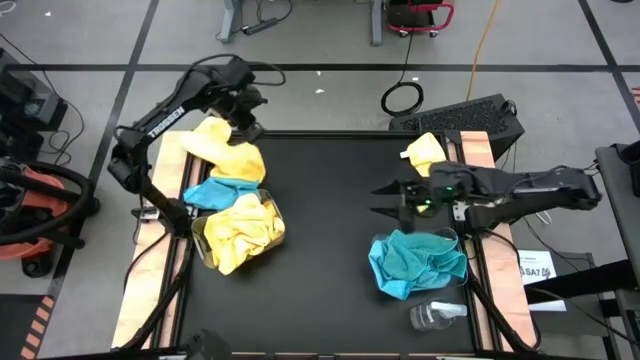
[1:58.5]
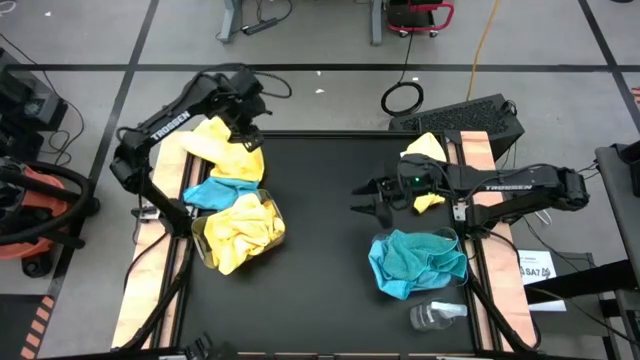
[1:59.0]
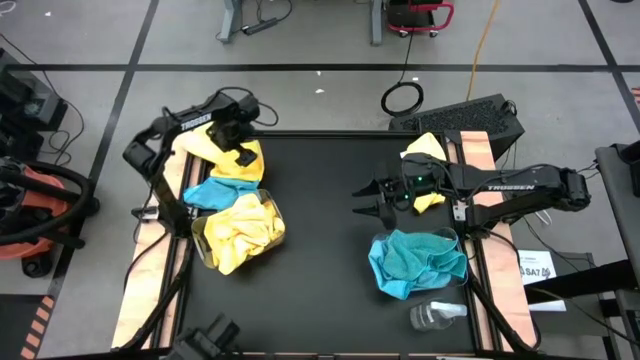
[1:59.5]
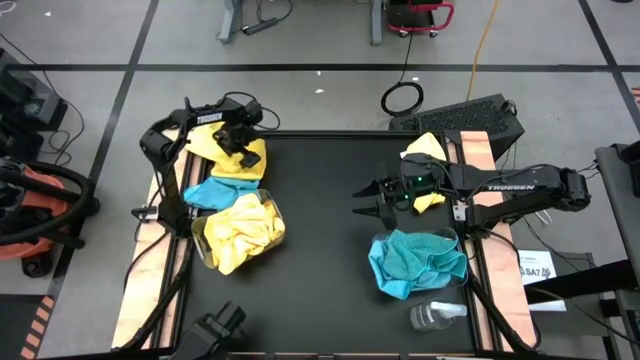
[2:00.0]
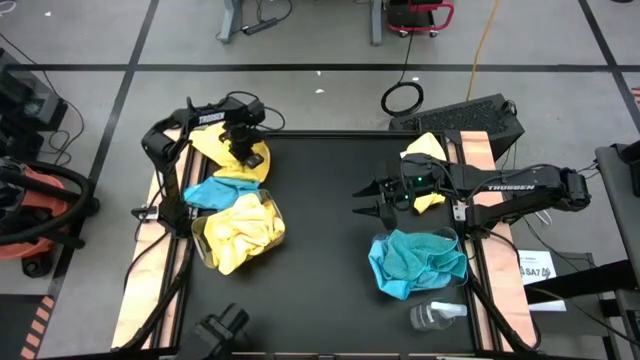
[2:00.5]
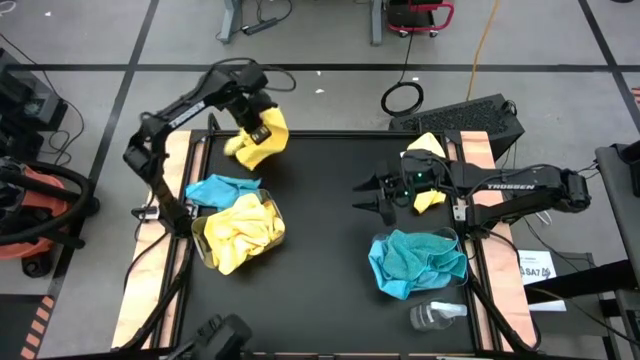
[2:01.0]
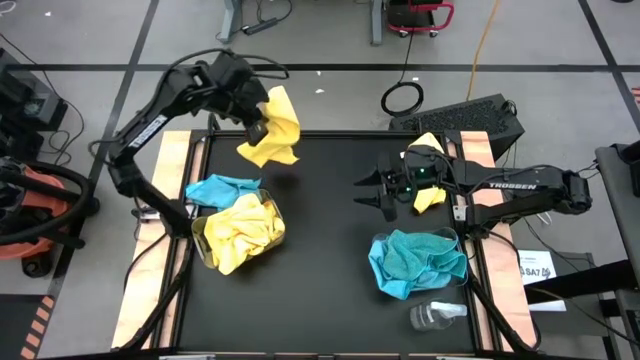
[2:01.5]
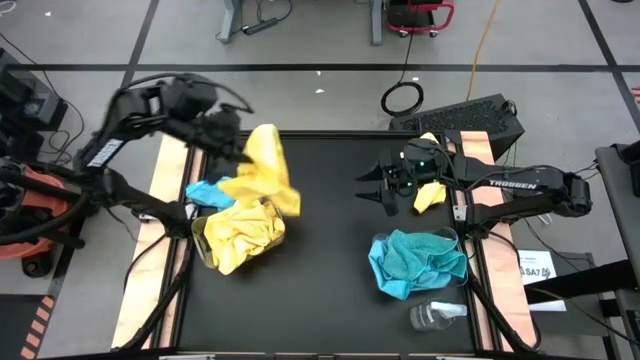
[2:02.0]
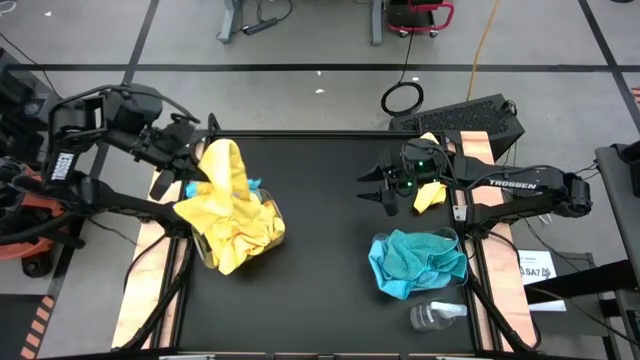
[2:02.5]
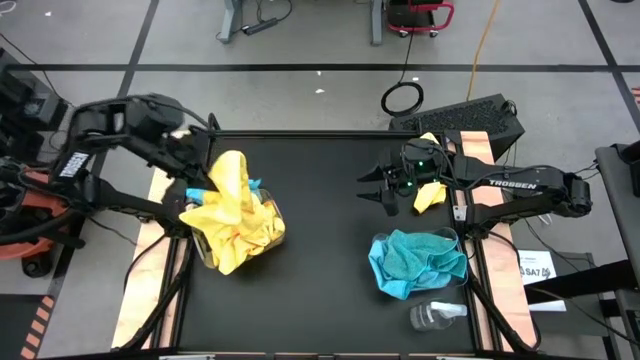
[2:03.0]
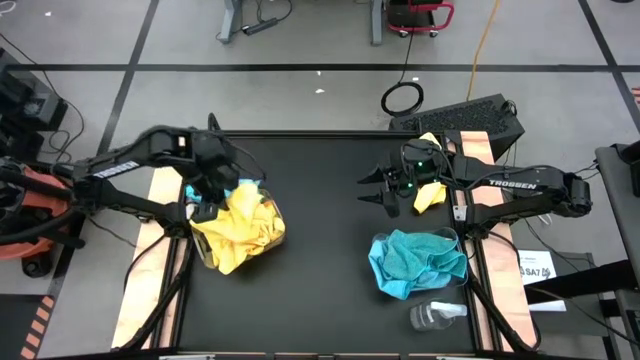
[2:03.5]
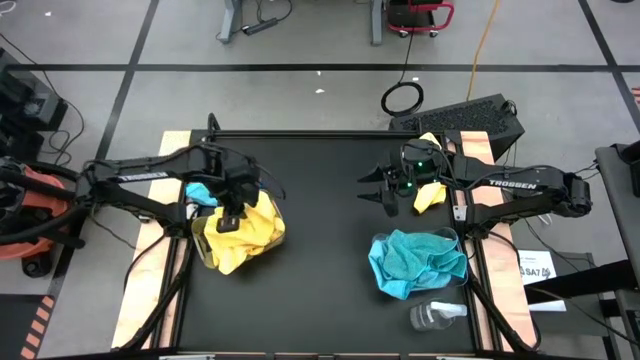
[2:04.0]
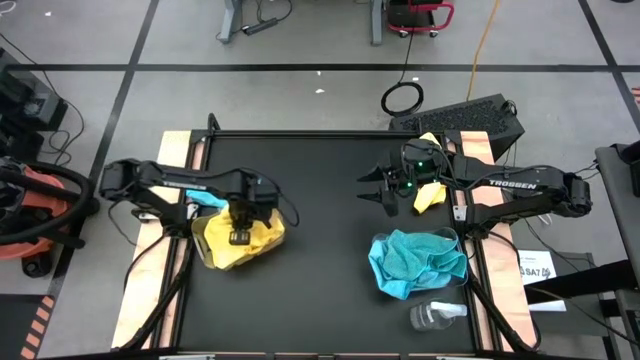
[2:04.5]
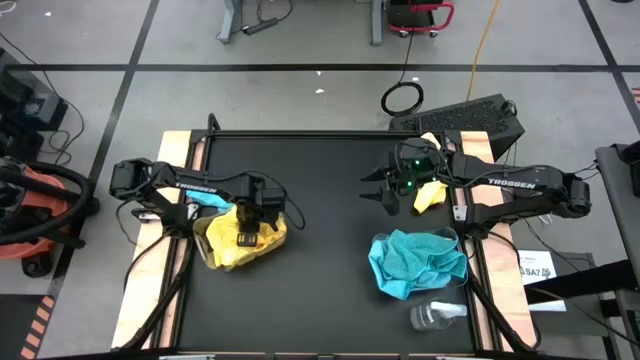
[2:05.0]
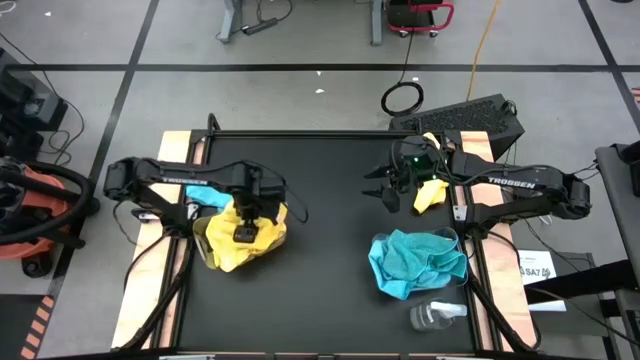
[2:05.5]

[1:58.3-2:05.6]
Task: Sort microfiber towel by color & place in baskets
Put the yellow microfiber towel into the left transparent bin

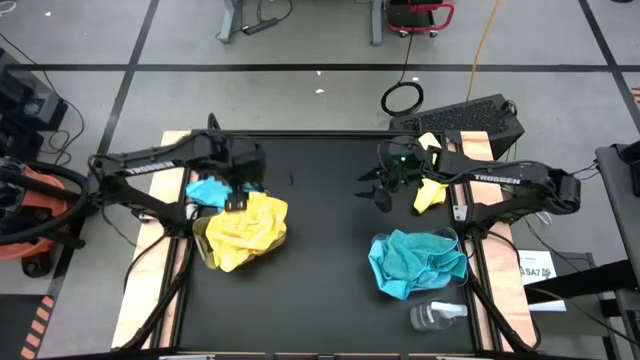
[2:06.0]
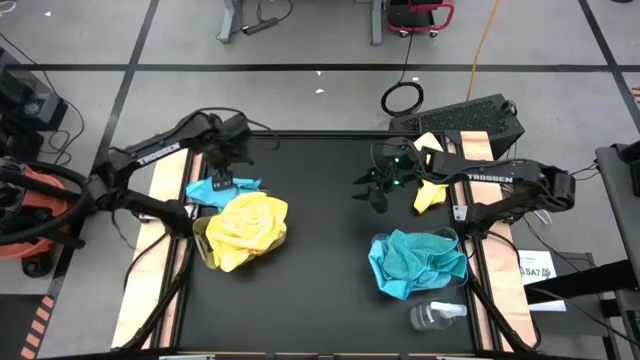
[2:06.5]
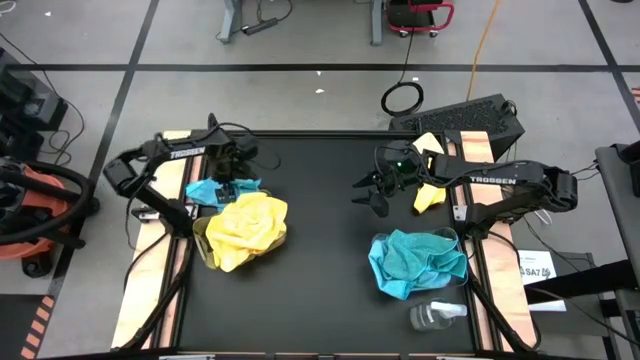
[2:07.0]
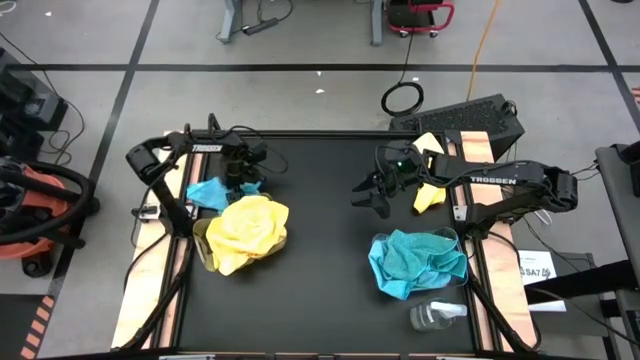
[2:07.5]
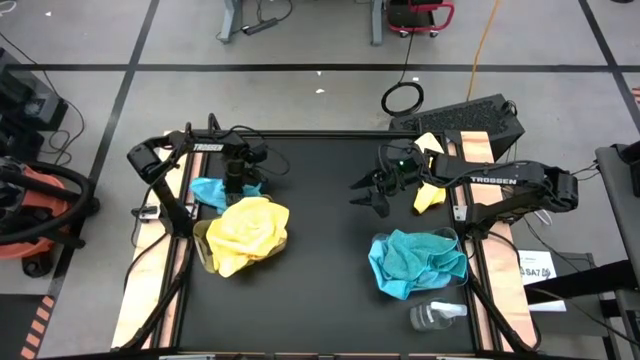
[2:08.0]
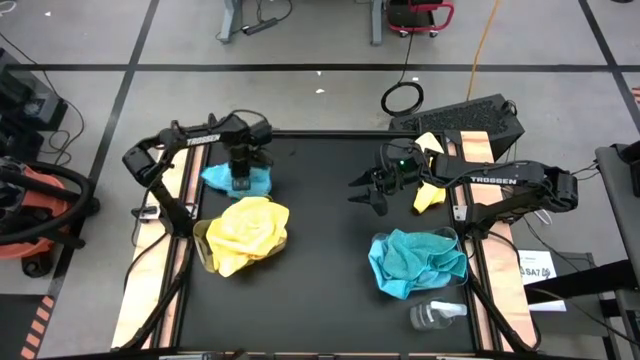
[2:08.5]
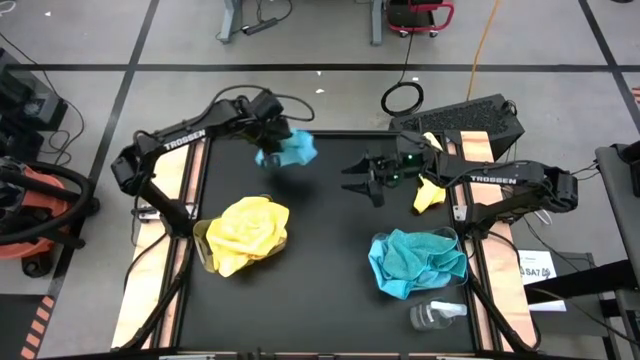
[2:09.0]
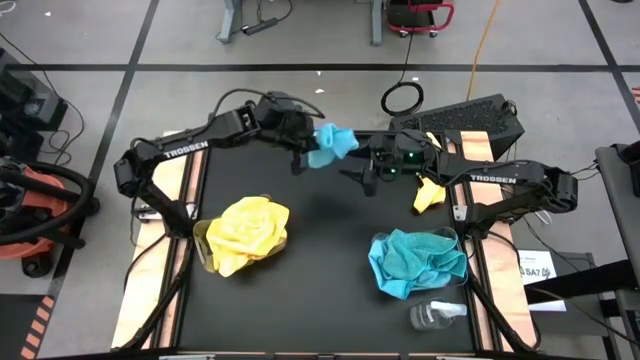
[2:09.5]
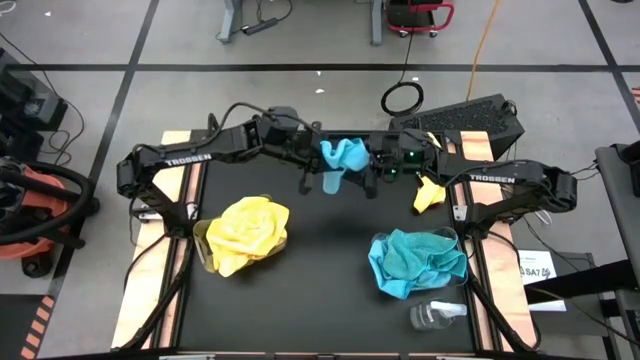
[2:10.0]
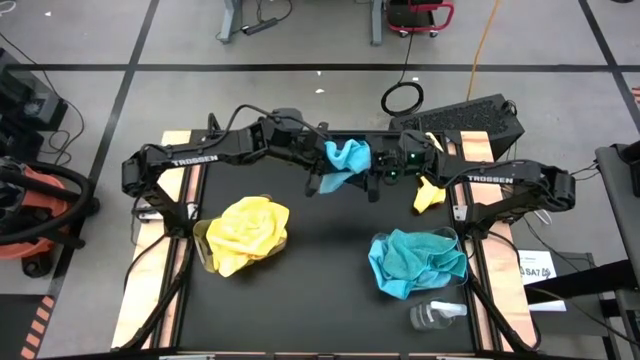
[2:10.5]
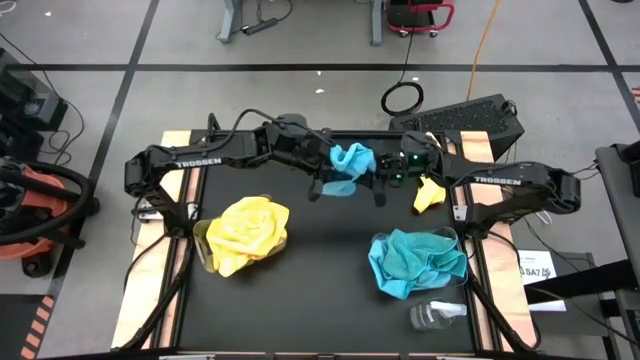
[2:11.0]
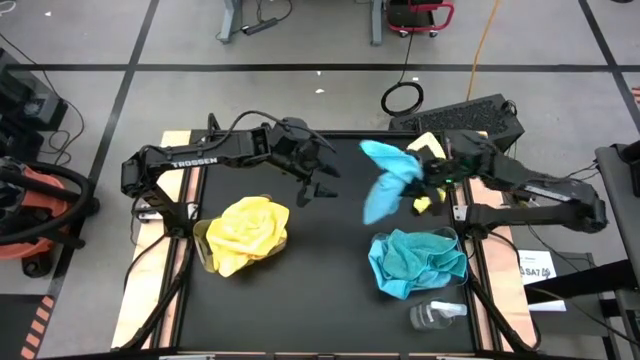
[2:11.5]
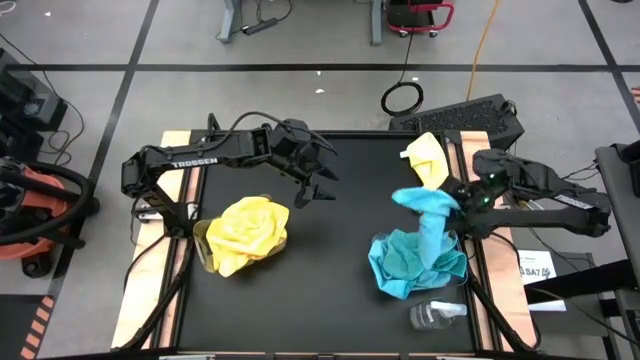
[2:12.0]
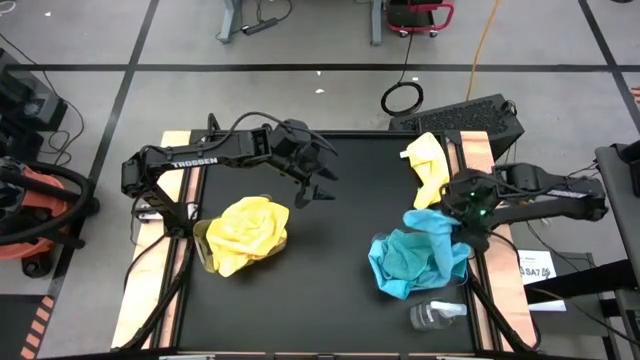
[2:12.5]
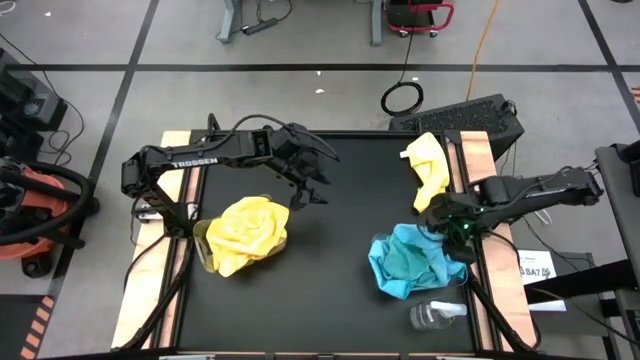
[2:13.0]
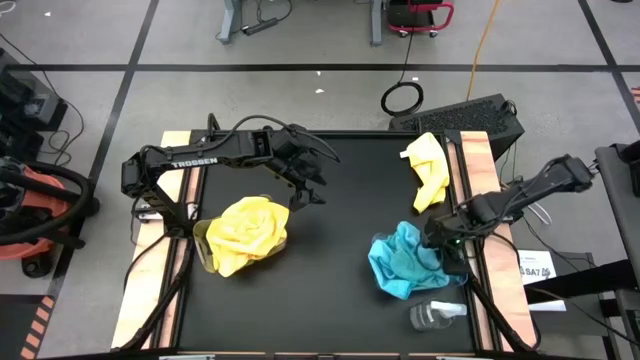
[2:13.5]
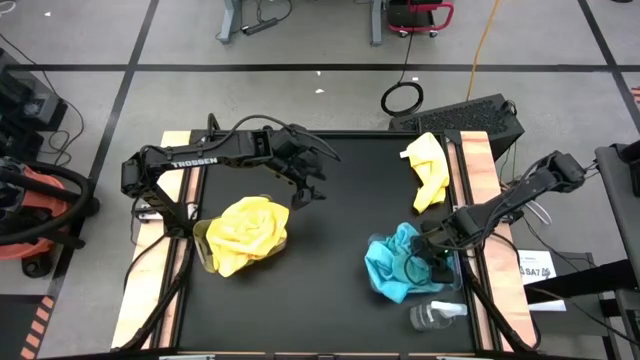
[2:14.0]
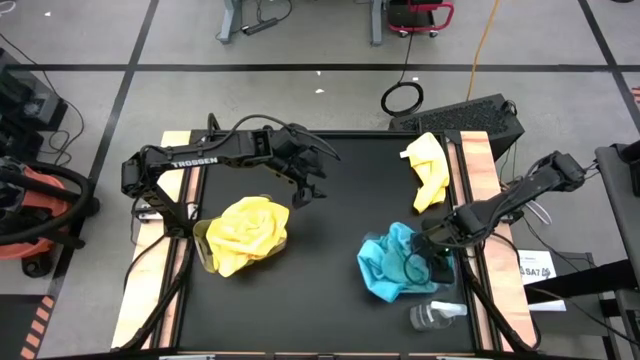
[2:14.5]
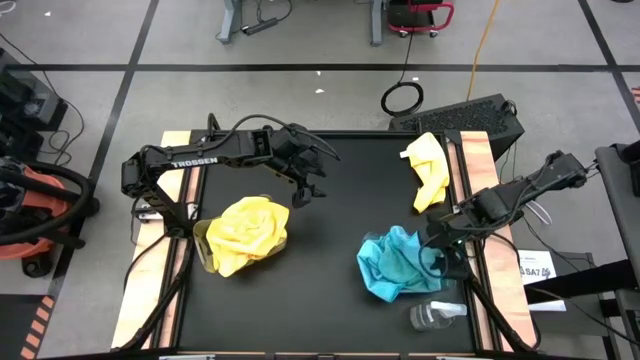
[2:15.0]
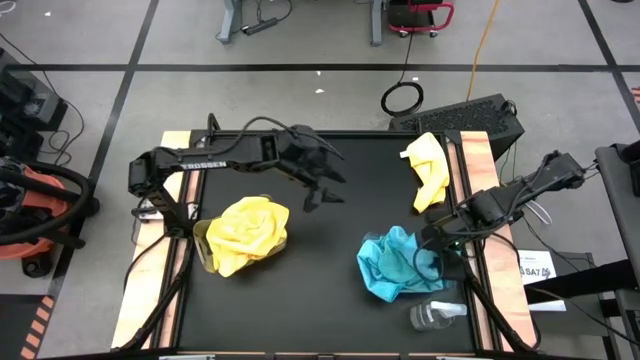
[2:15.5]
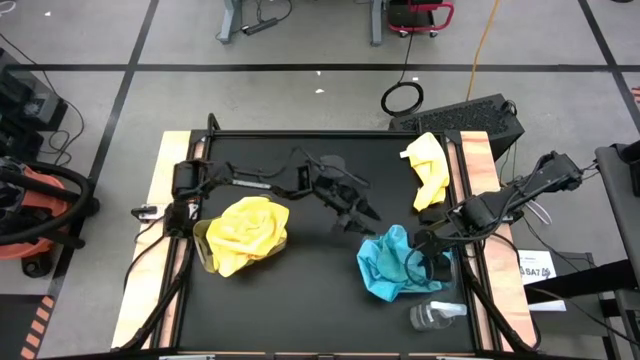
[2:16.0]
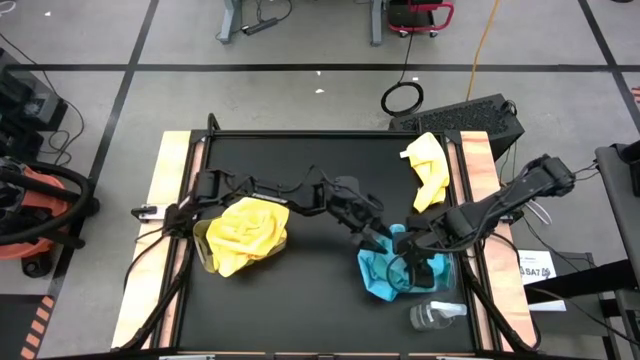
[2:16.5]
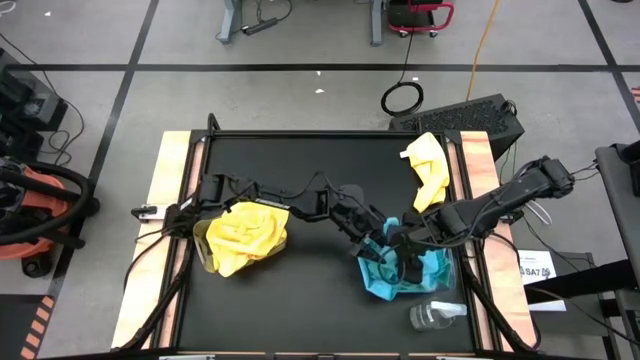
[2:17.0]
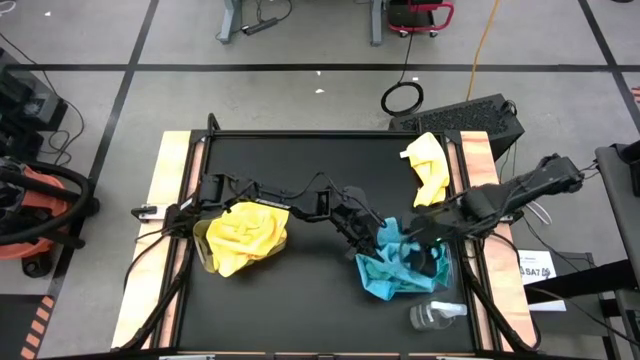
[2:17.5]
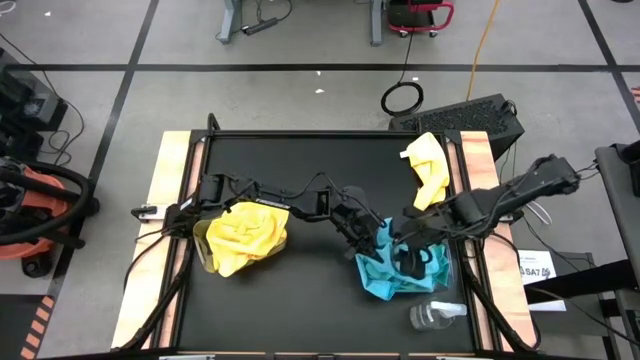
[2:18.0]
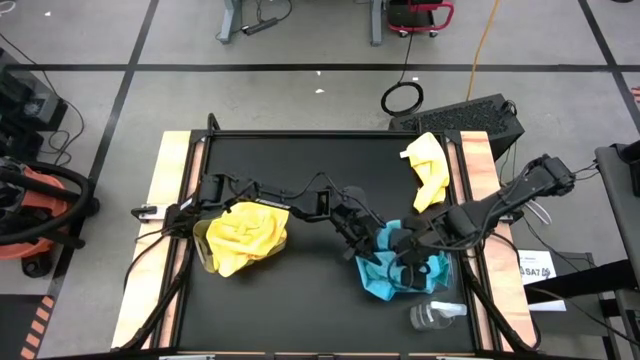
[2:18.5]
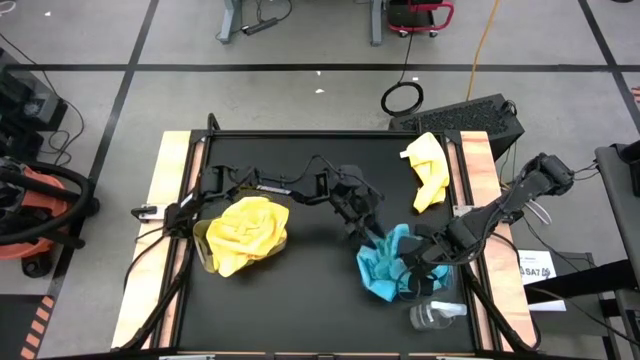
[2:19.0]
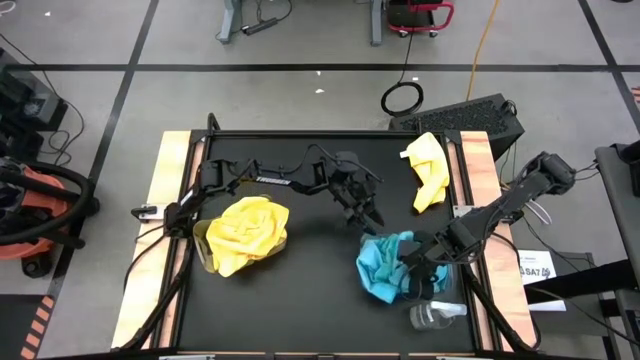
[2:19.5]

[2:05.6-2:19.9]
Put the blue microfiber towel into the right transparent bin

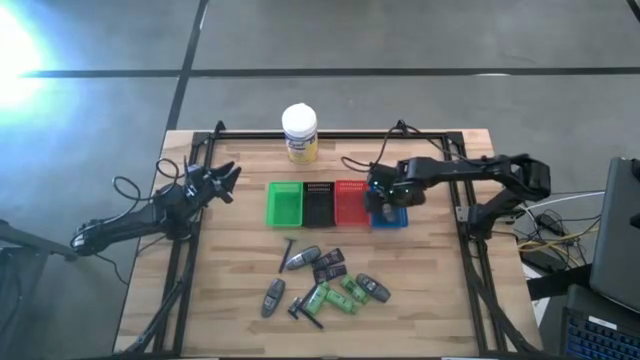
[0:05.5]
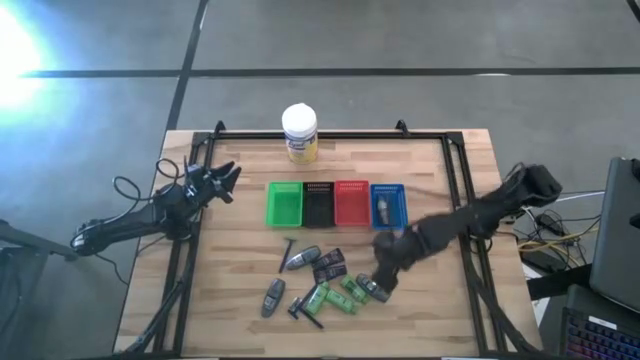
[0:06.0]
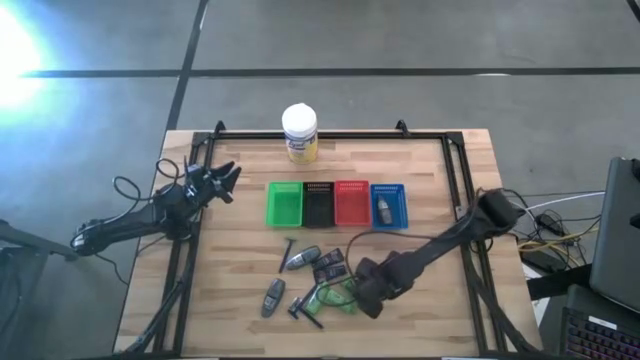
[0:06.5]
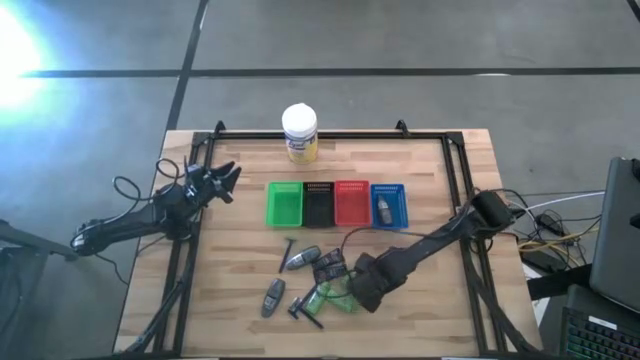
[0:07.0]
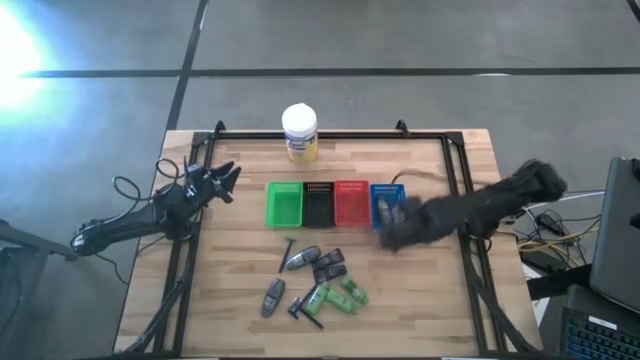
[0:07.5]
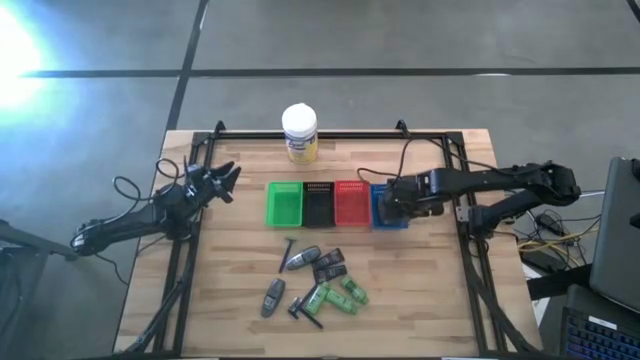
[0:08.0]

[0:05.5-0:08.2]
Task: Pick & Place Travel size toiletries
Put the gray deodorant into the blue bin
